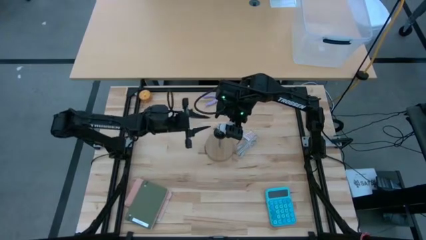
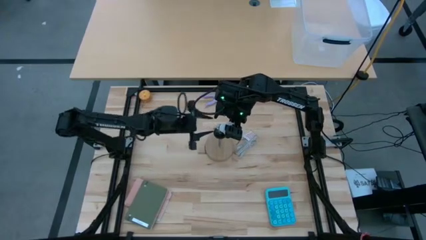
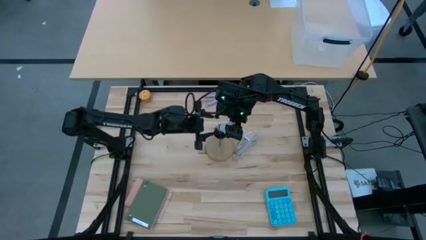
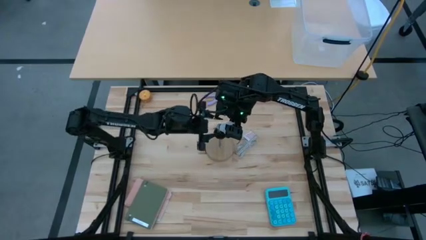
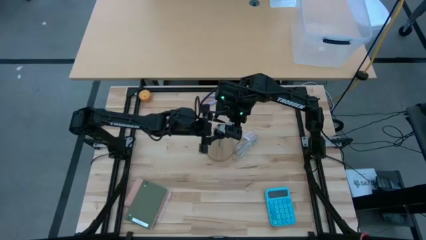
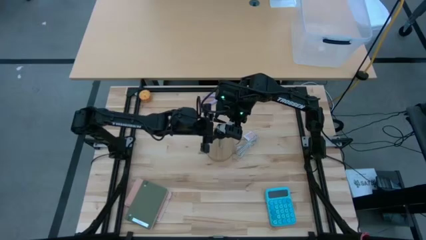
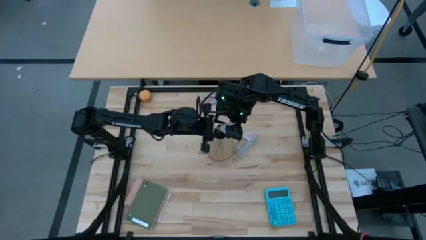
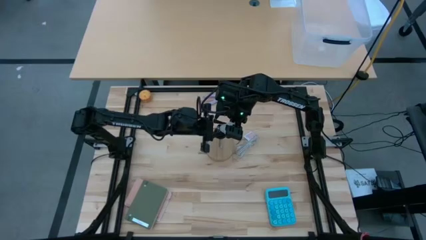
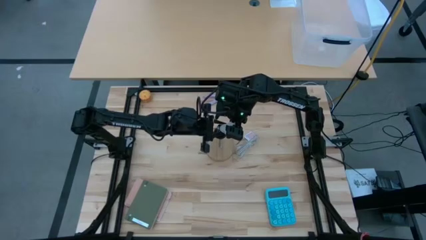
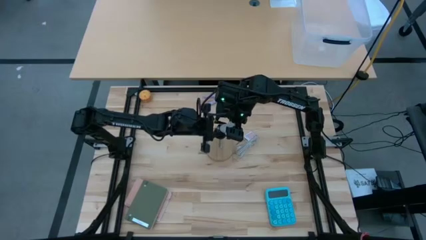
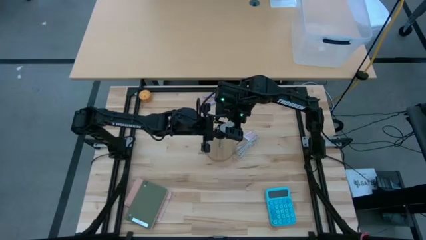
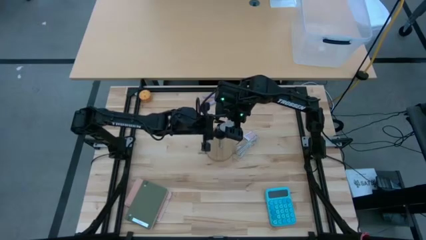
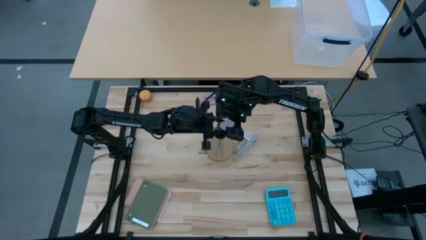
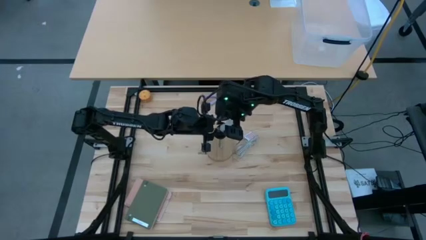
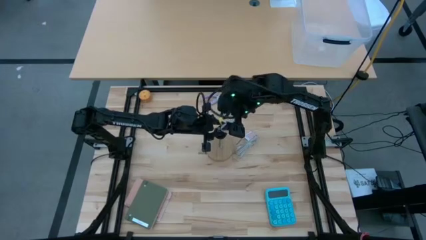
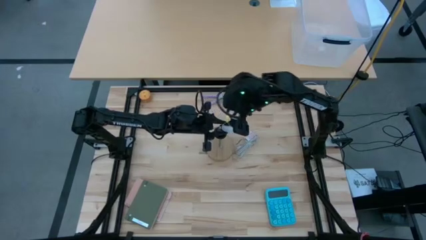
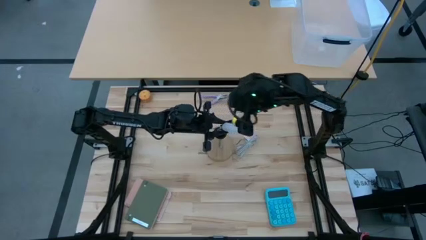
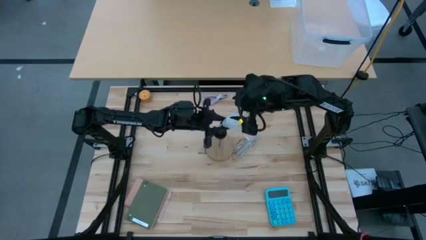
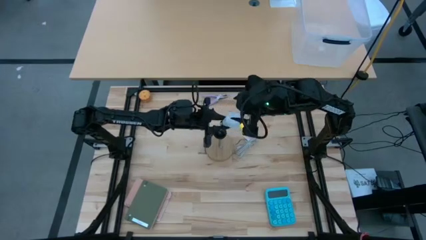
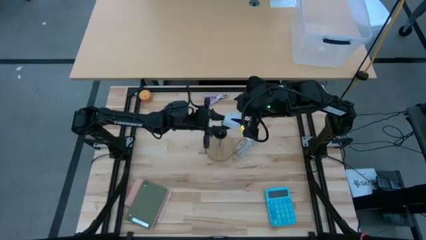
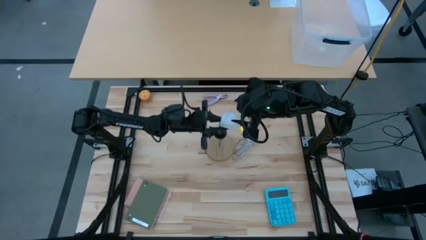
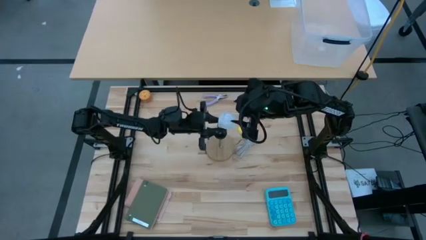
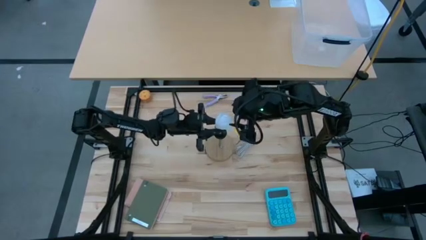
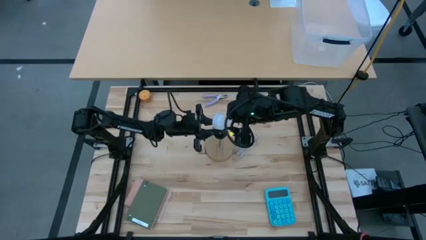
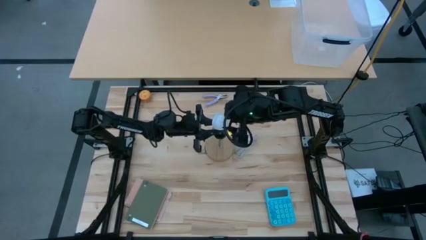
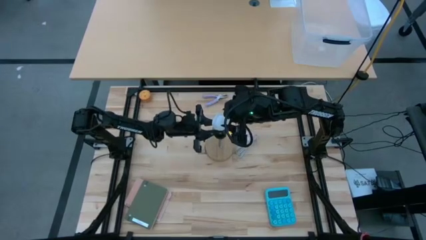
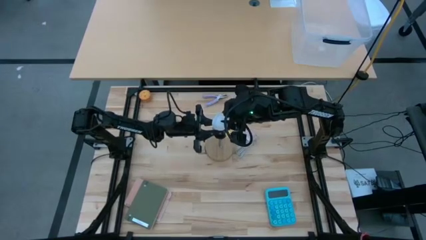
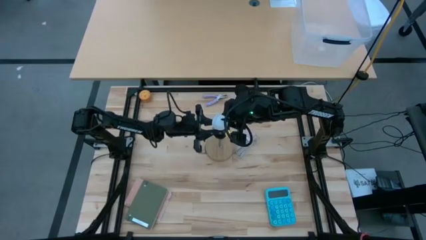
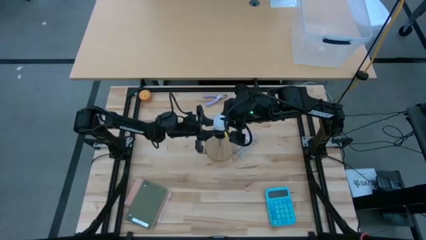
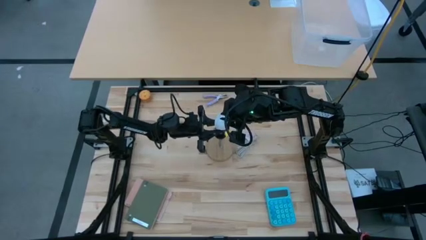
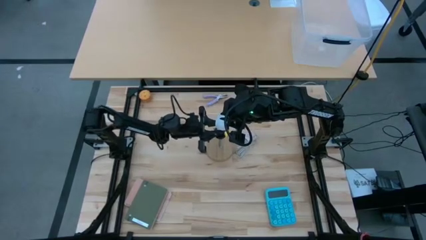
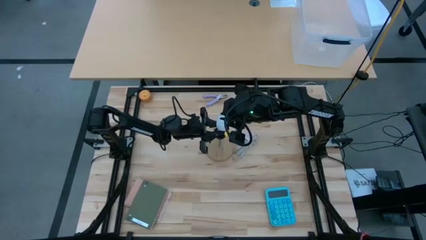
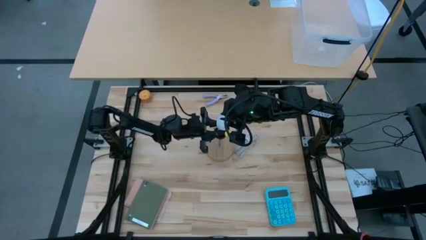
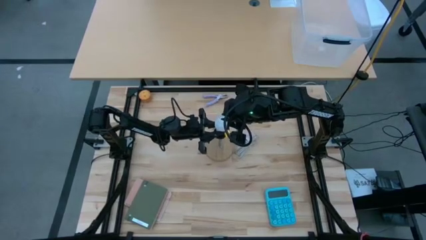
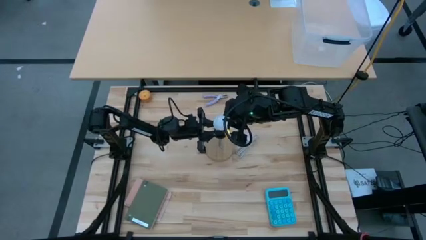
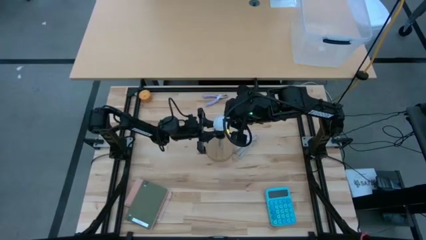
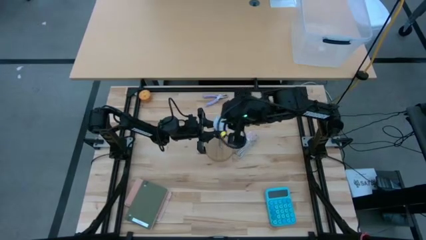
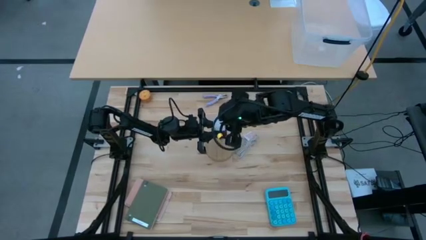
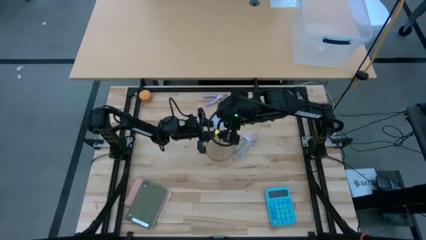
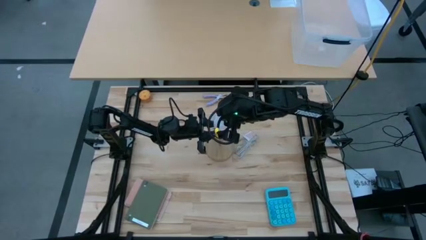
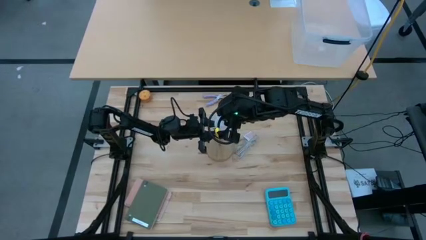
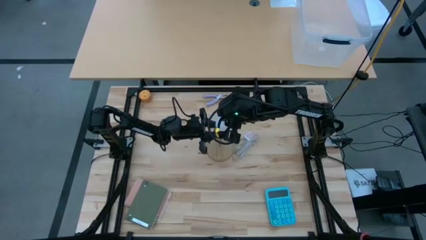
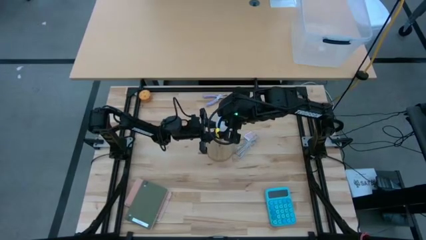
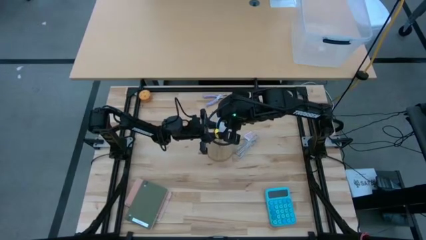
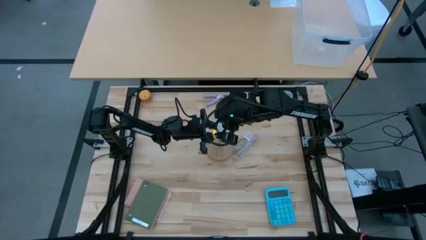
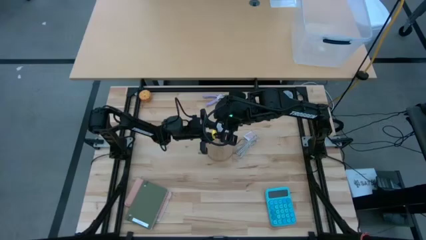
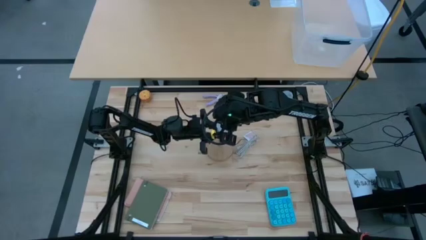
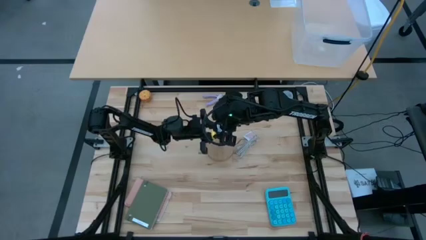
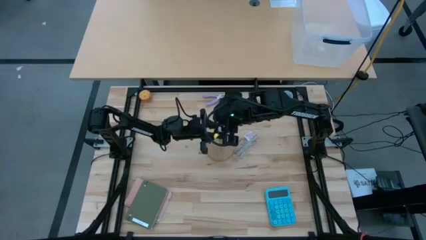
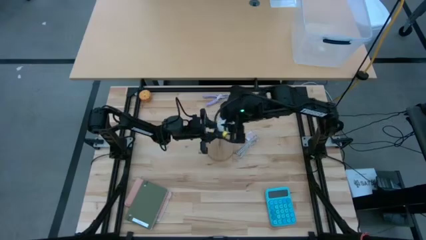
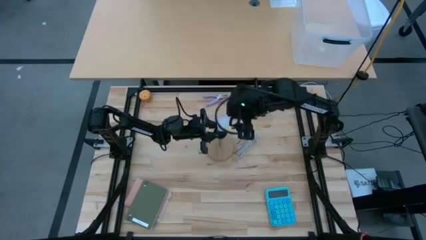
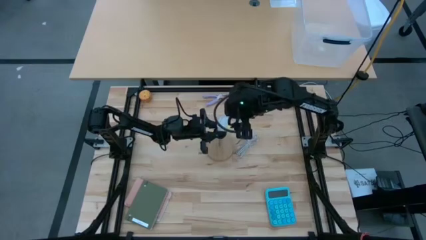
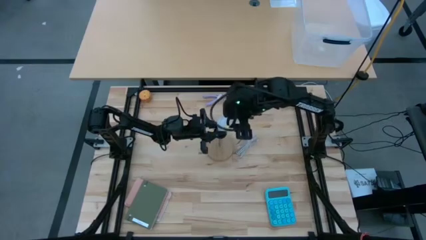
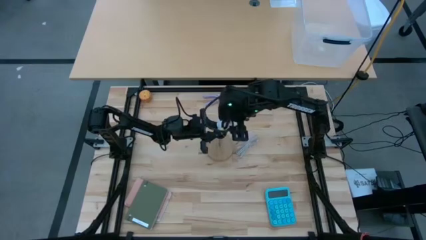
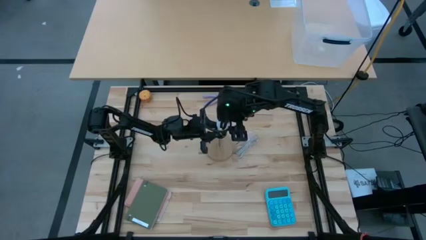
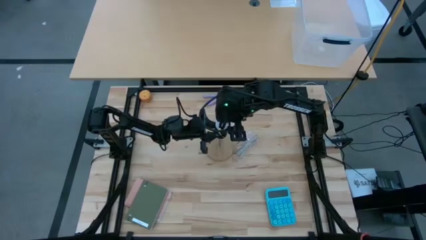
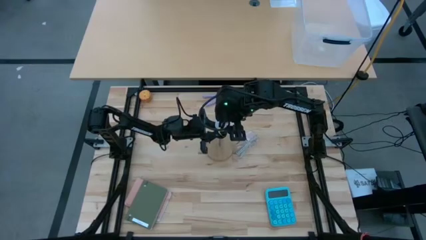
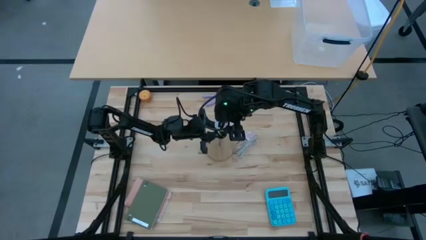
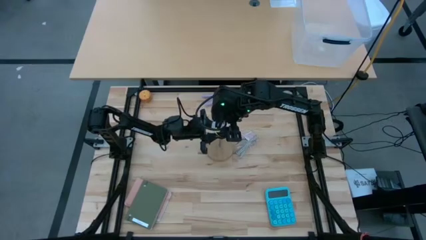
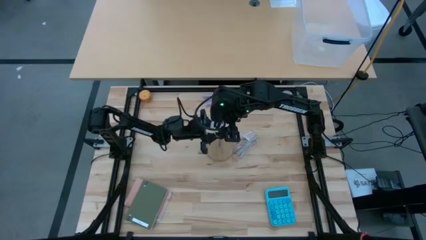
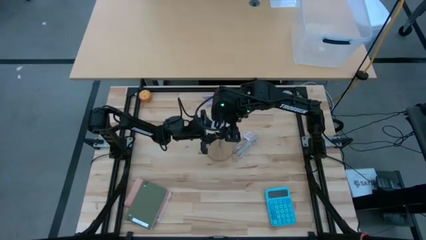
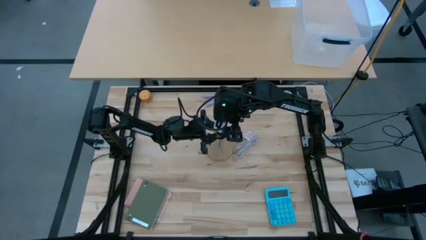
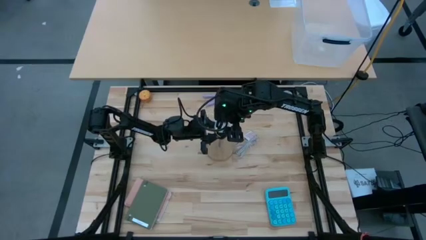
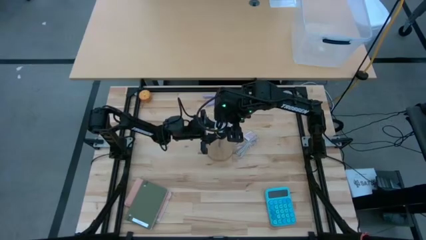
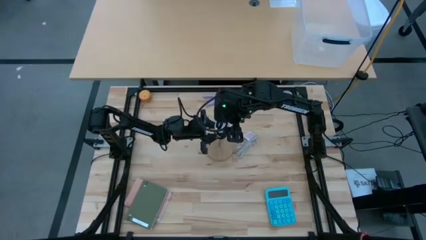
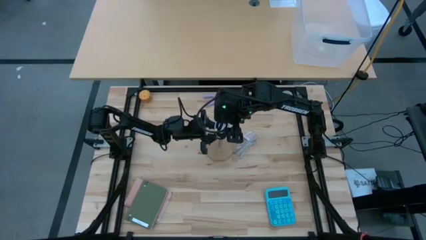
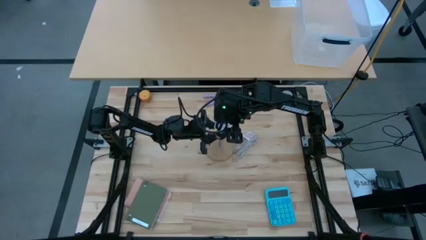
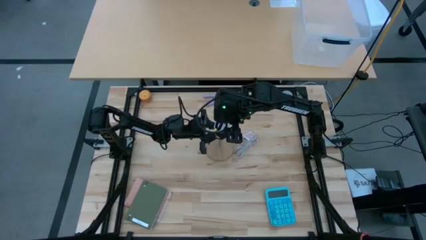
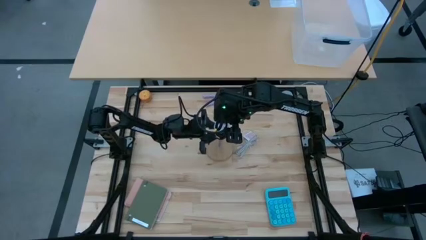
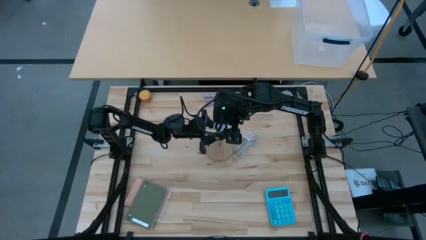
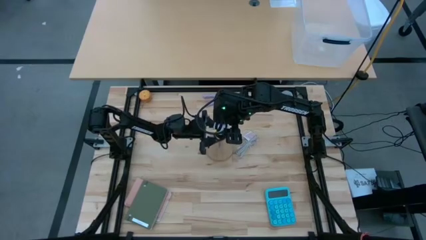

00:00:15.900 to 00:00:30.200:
Task: Screw lightbulb
Insert the light bulb on the brown lamp

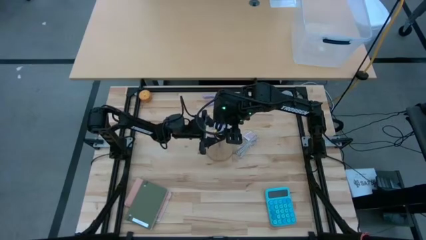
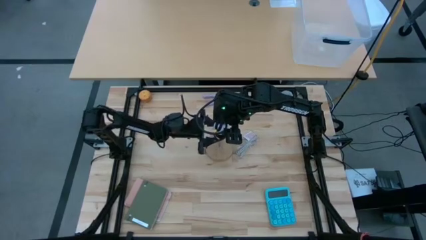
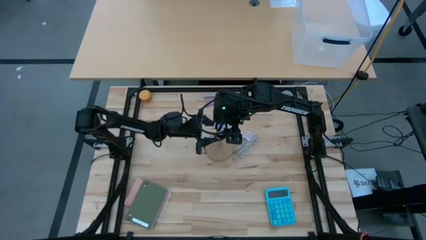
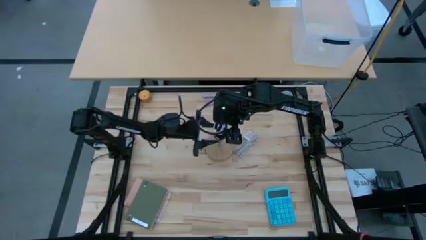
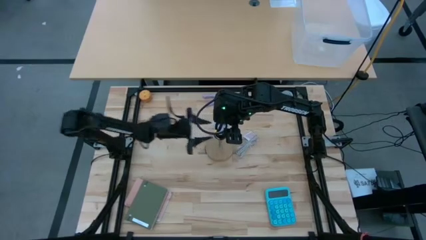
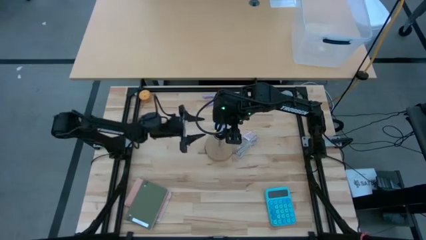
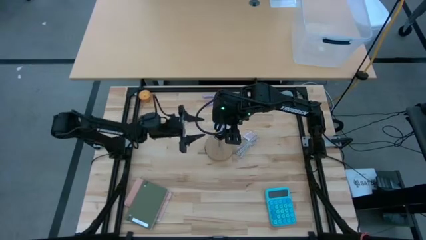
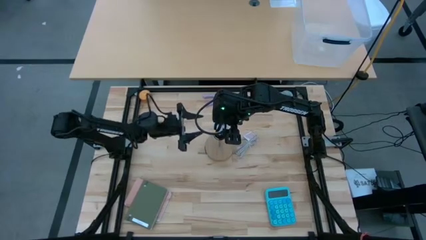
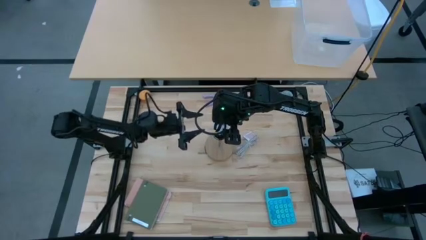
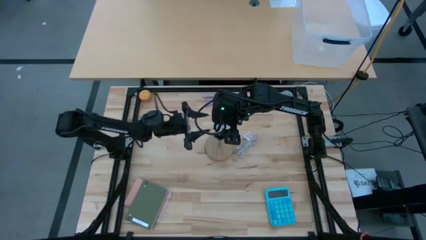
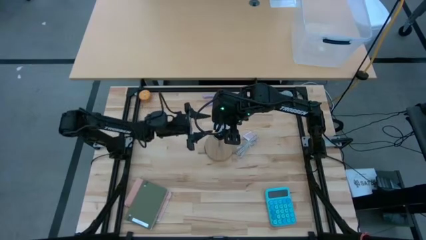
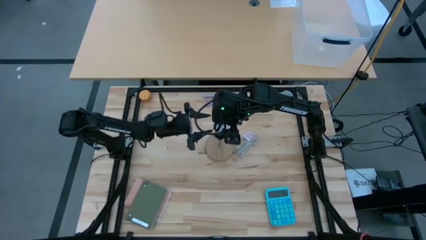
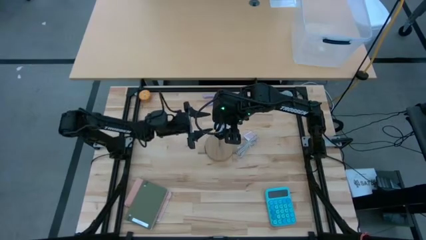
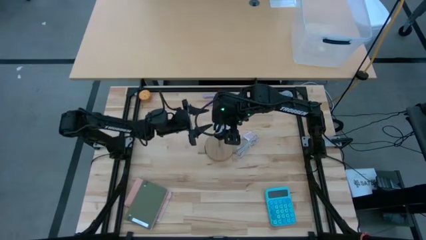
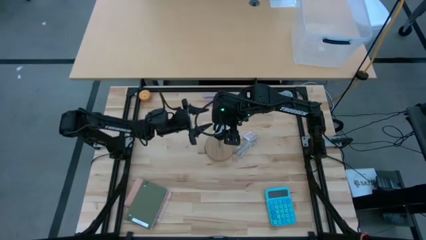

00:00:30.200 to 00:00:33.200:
Insert the light bulb on the brown lamp
